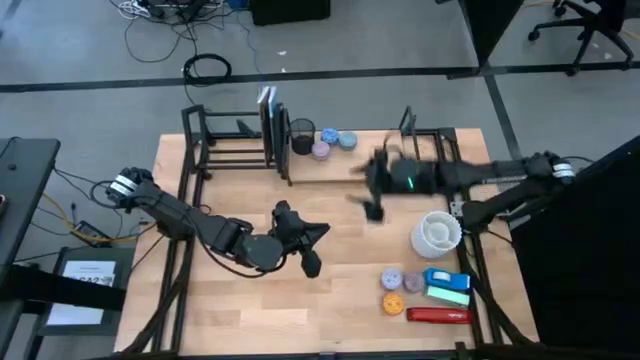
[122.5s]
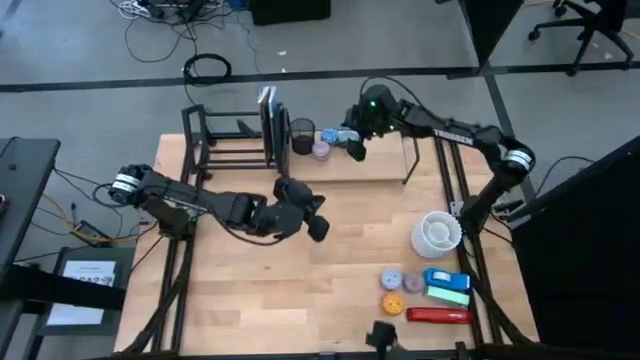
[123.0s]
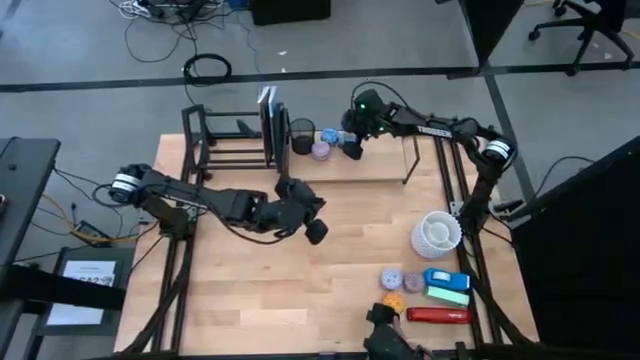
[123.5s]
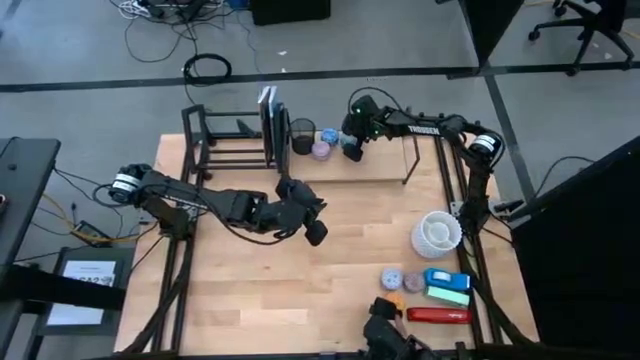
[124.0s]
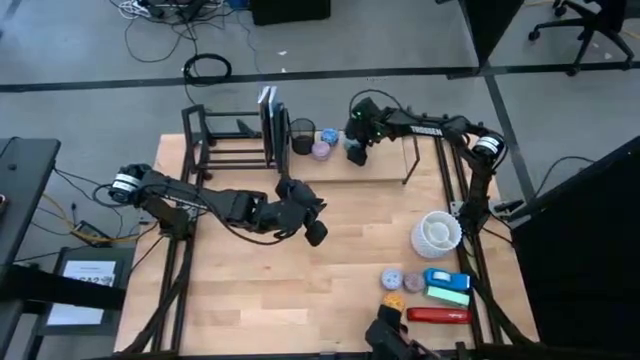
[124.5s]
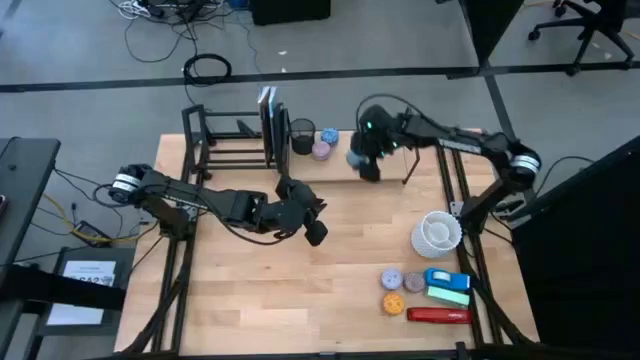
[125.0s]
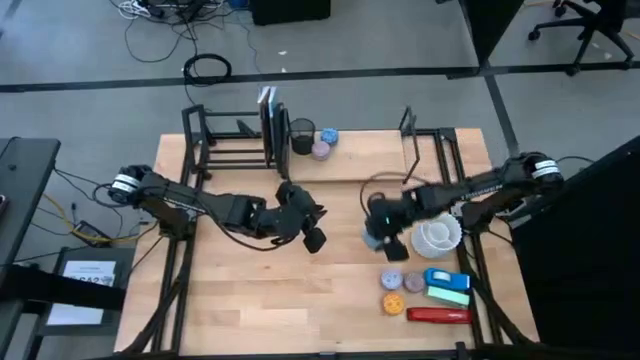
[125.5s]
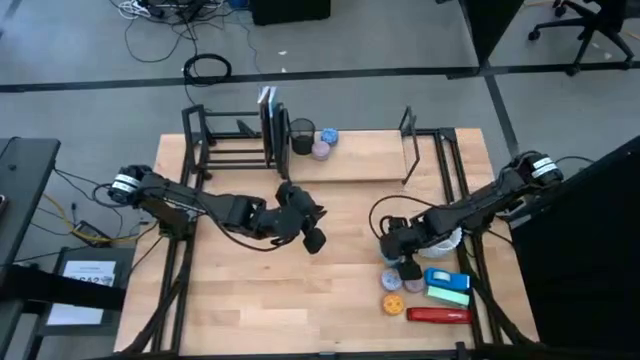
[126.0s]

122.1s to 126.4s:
Task: Stock shelves
Remove the green scented candle from the shelf

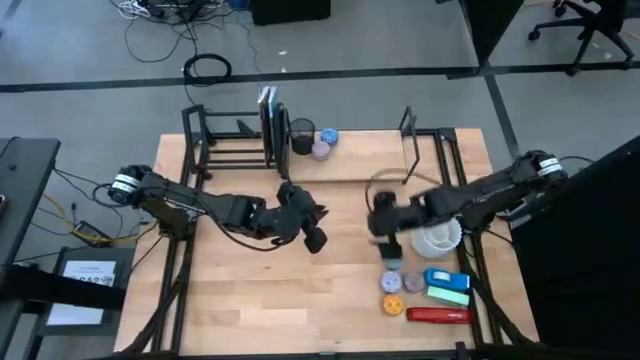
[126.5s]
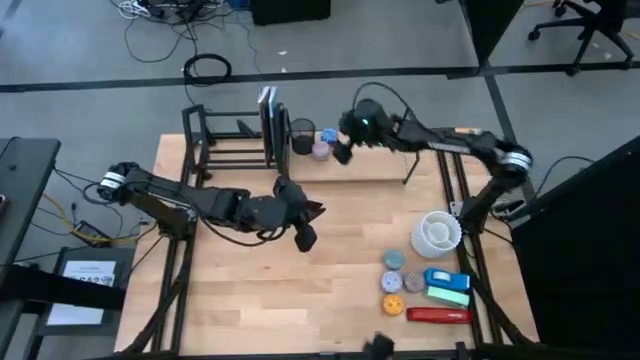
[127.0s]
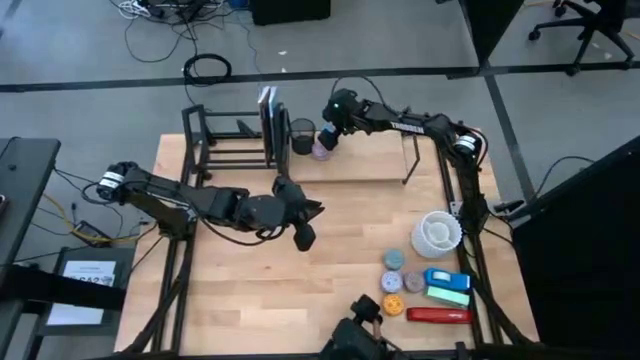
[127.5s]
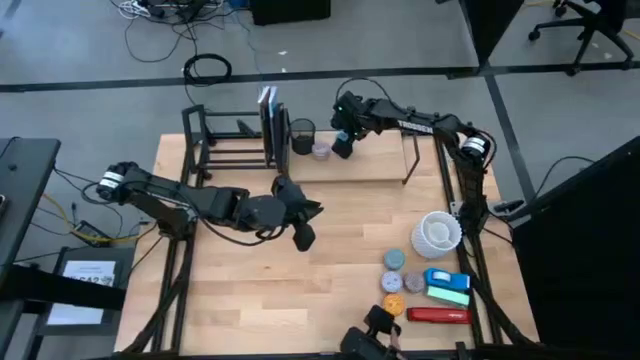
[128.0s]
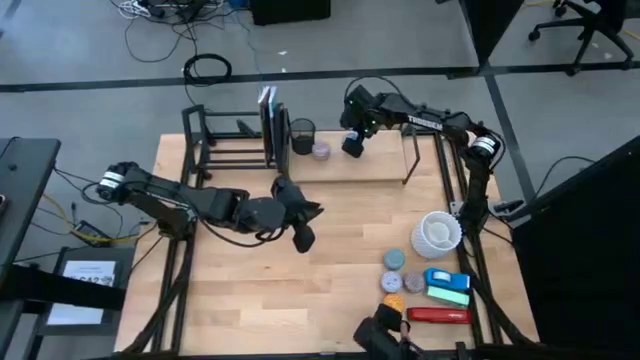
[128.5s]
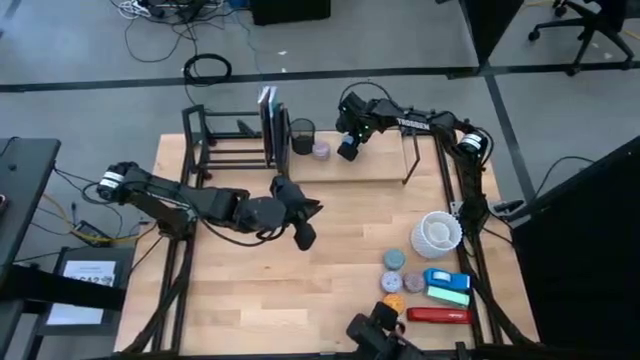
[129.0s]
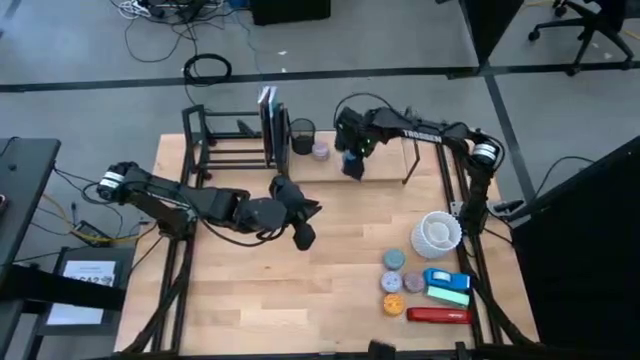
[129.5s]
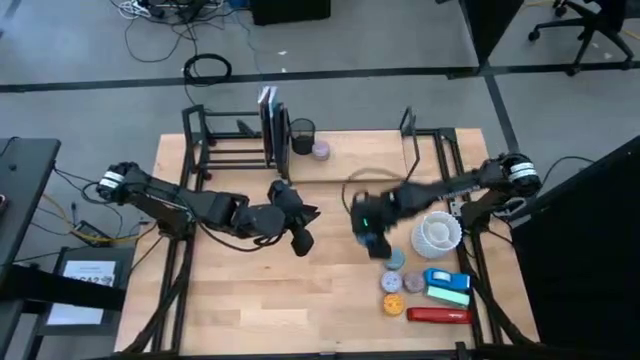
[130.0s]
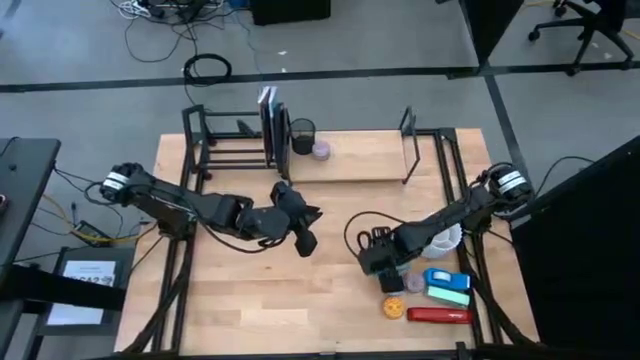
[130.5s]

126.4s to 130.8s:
Remove the blue scented candle from the shelf

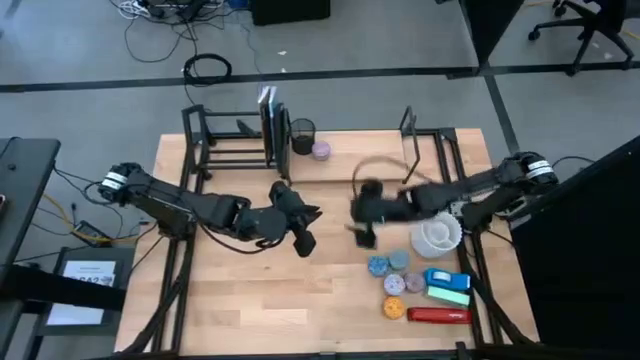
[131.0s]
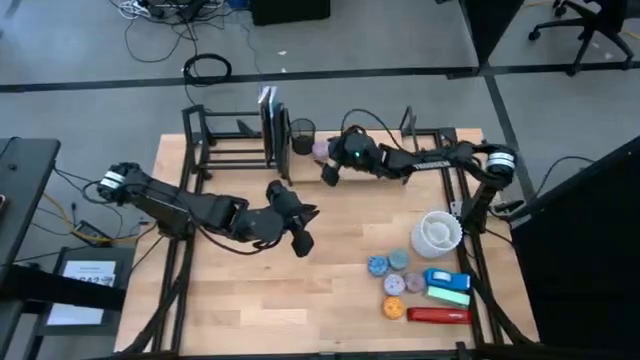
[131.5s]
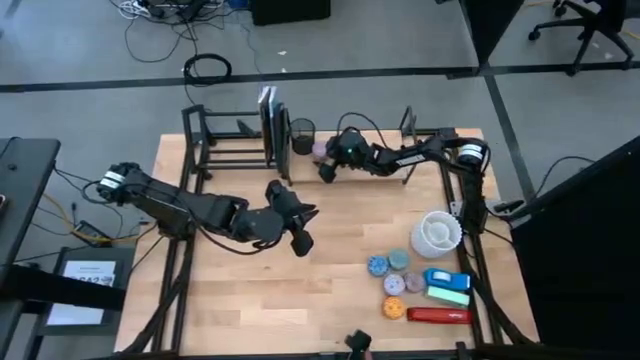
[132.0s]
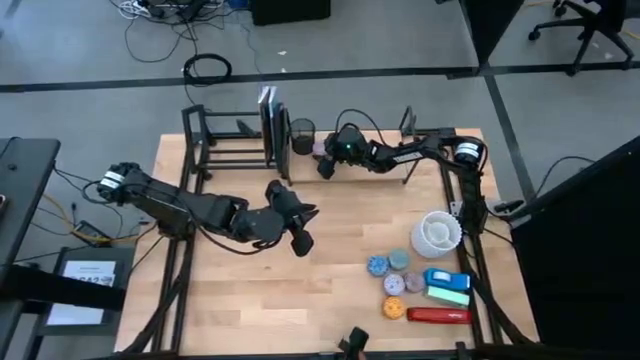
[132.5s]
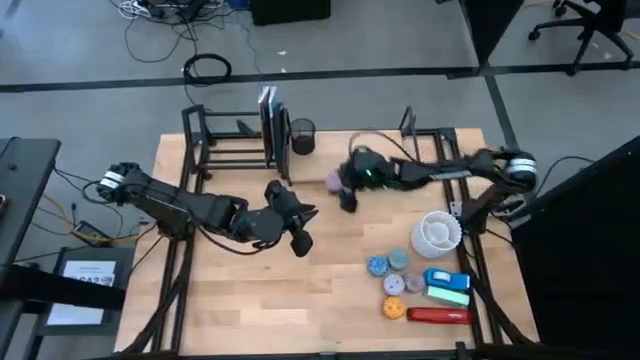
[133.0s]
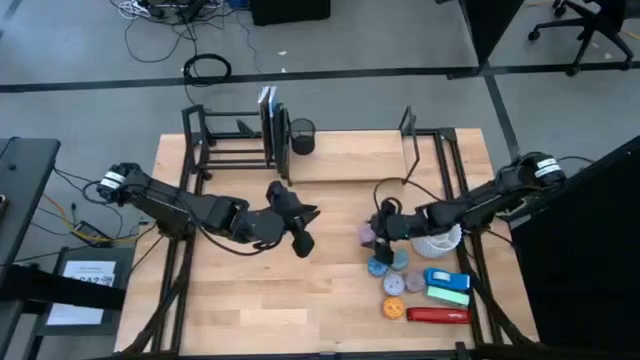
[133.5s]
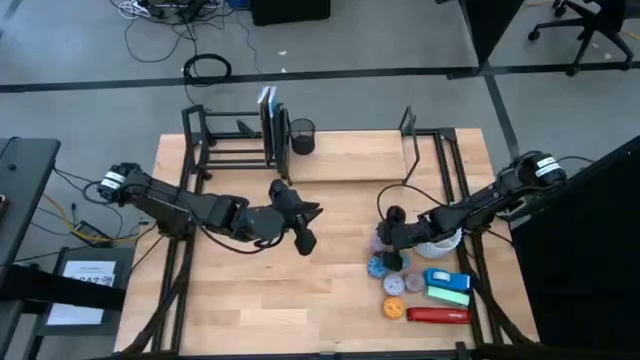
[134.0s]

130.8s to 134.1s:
Remove the light purple scented candle from the shelf

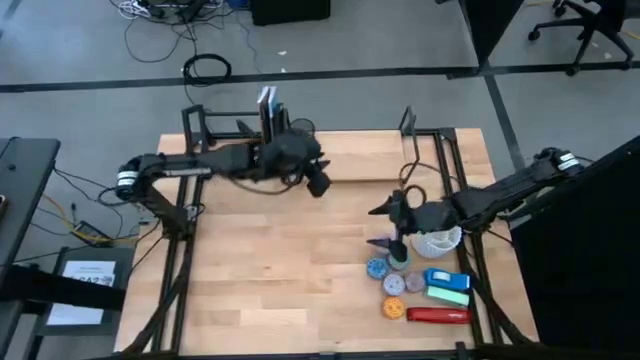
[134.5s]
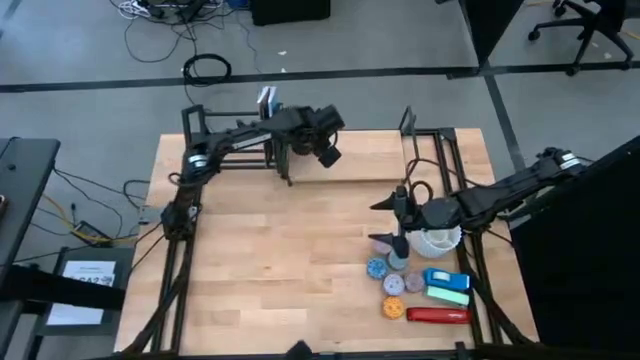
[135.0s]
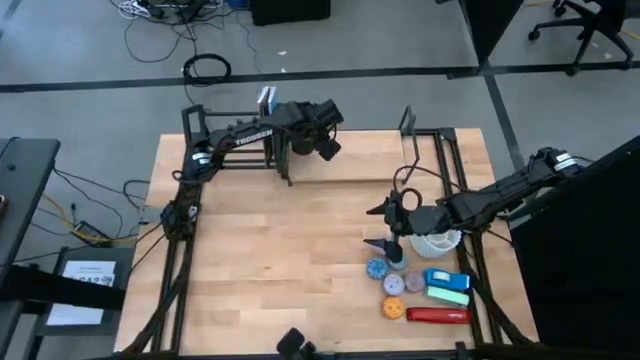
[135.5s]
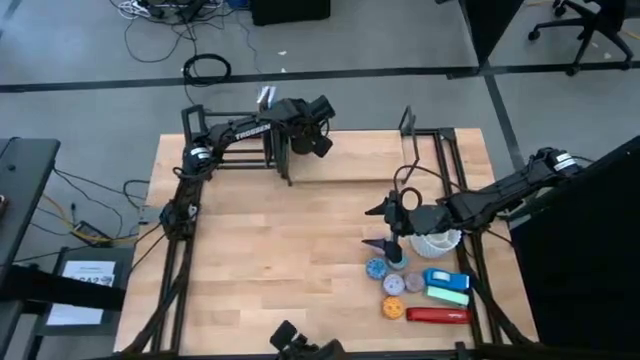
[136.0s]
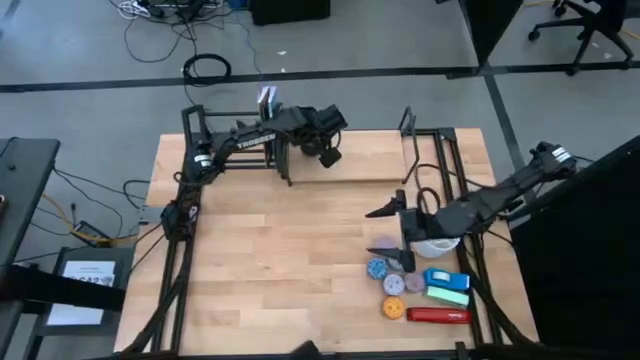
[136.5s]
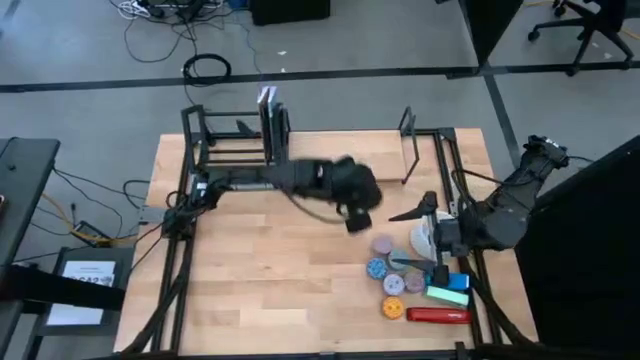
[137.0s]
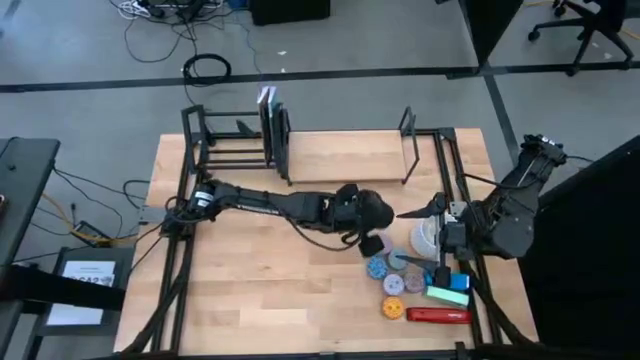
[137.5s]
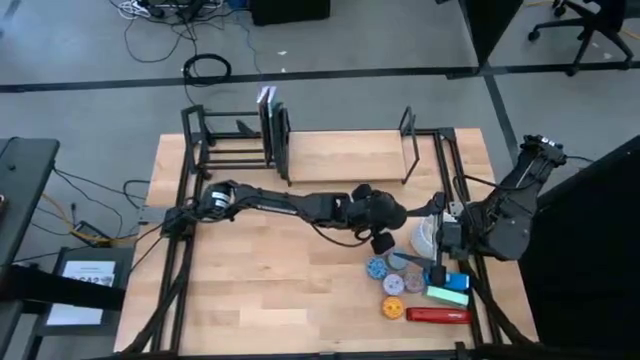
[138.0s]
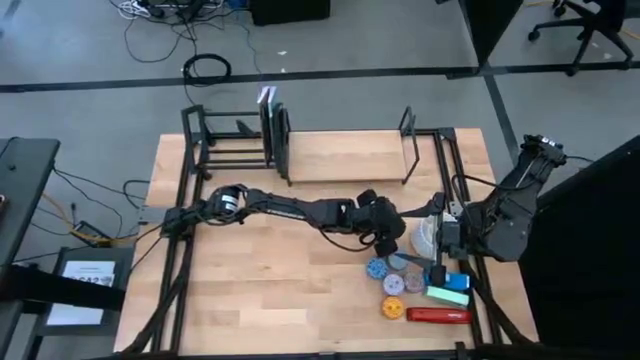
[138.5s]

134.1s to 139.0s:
Remove the black pen organizer from the shelf

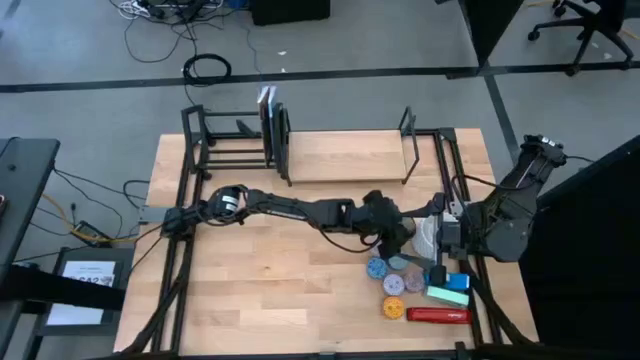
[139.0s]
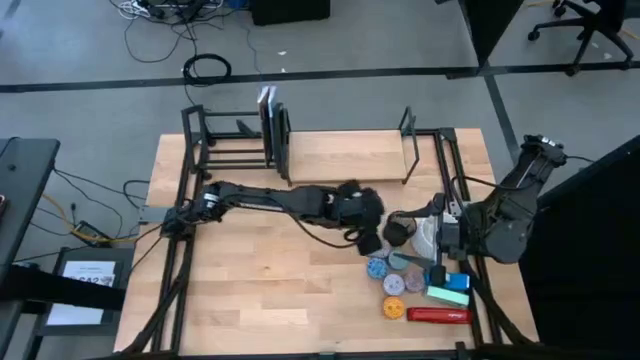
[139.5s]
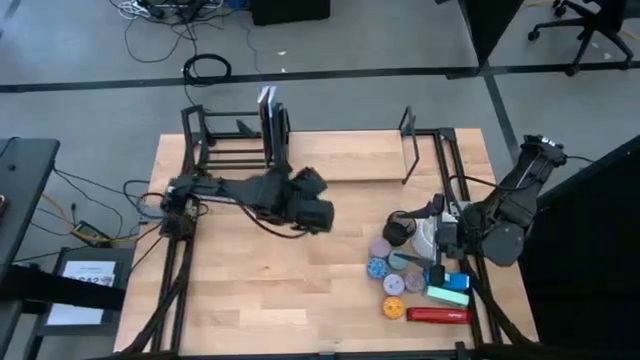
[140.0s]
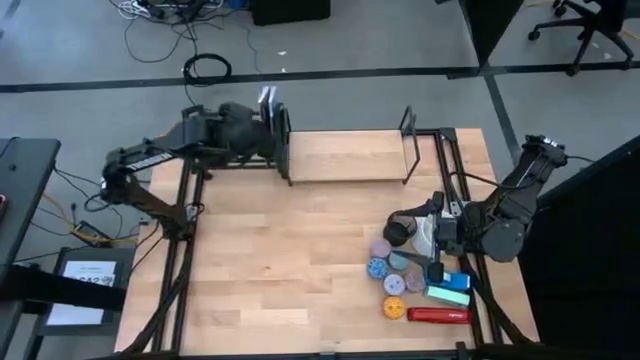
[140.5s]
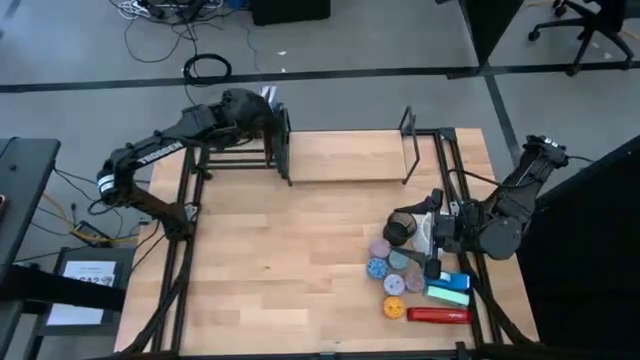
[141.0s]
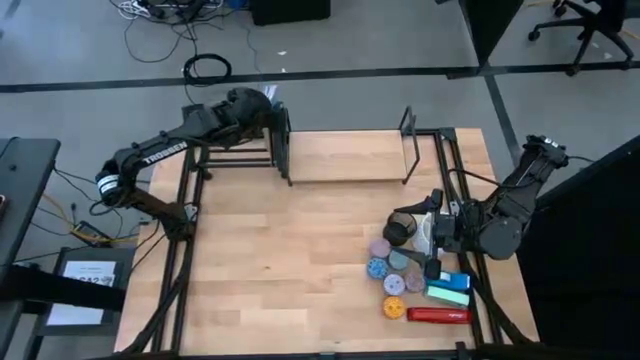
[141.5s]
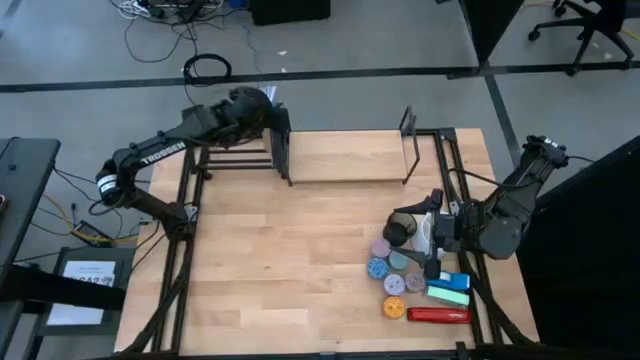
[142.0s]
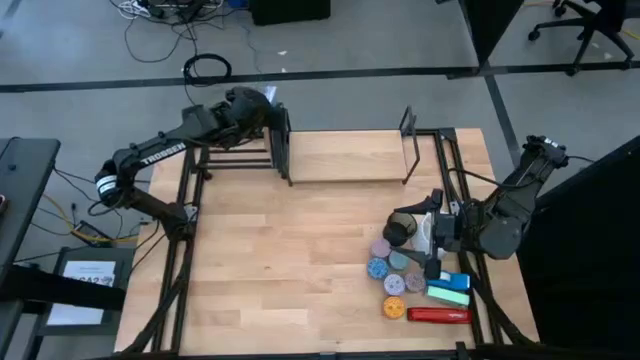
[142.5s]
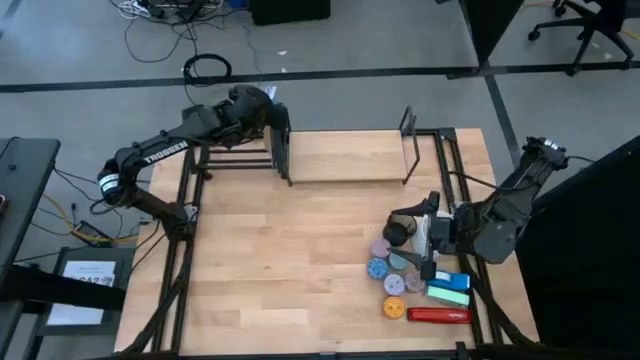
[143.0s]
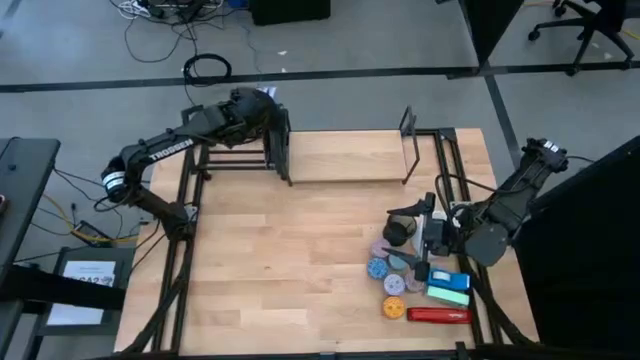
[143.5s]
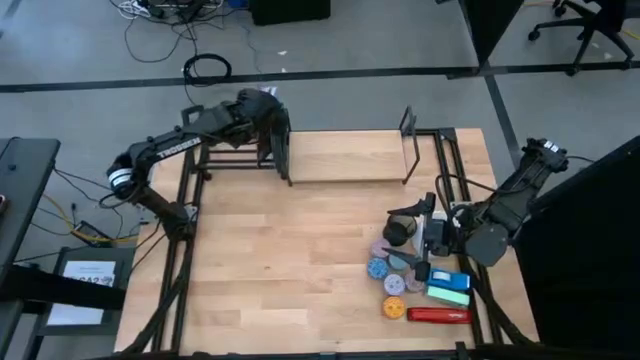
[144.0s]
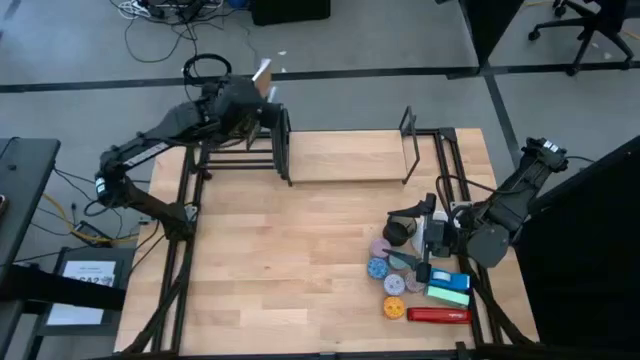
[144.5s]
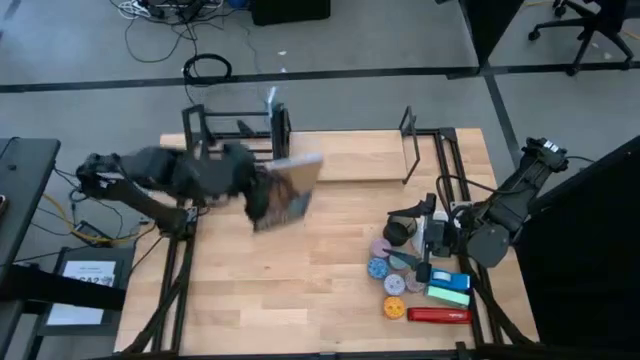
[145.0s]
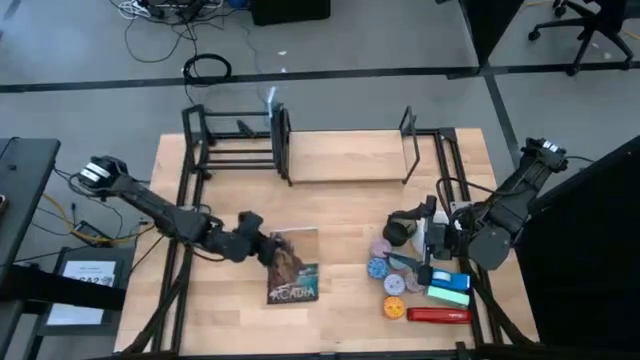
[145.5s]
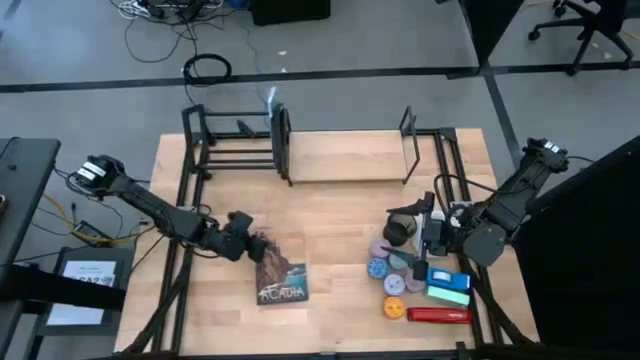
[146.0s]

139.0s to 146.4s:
Remove the brown book from the bookshelf
